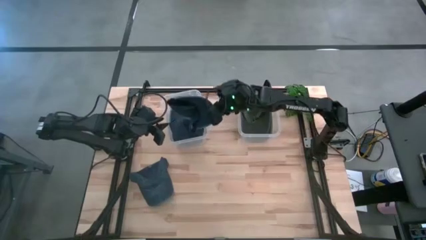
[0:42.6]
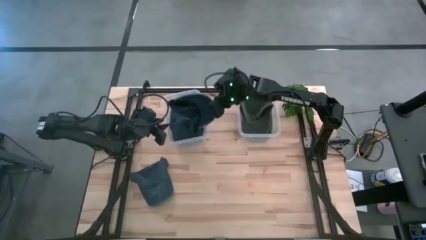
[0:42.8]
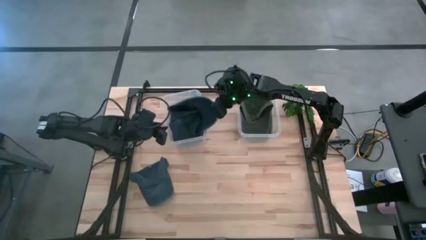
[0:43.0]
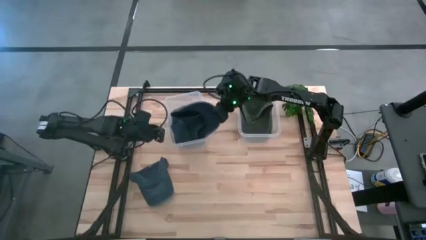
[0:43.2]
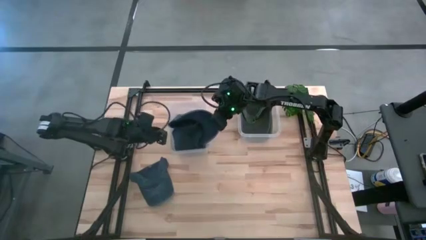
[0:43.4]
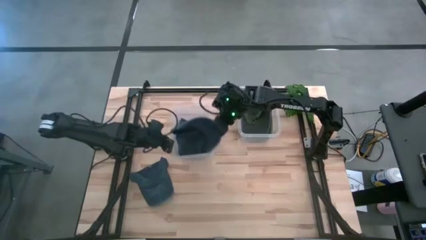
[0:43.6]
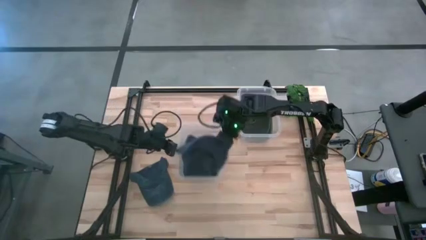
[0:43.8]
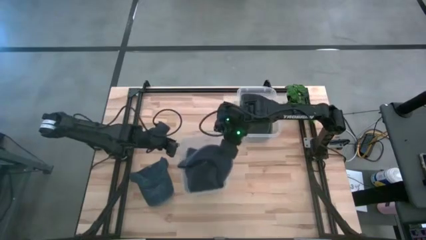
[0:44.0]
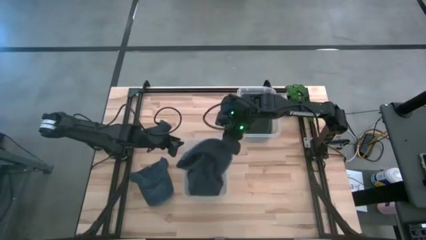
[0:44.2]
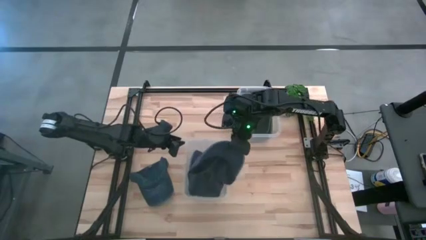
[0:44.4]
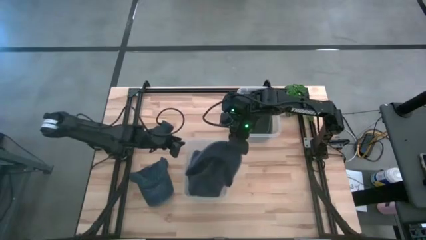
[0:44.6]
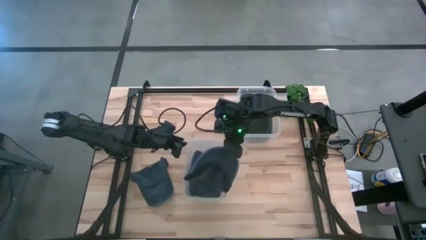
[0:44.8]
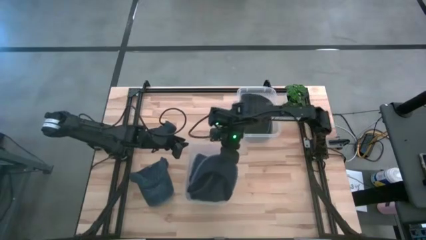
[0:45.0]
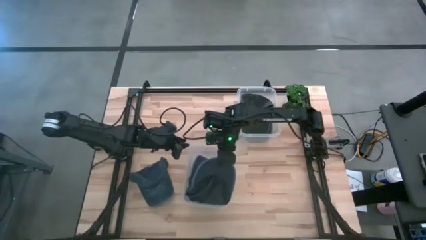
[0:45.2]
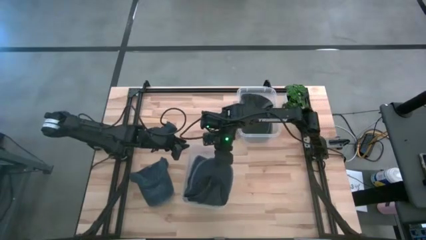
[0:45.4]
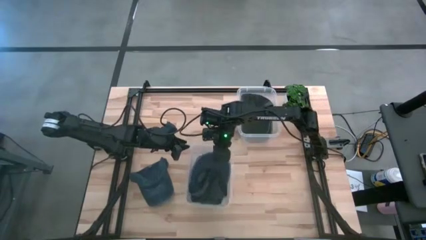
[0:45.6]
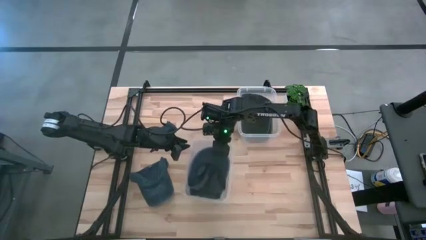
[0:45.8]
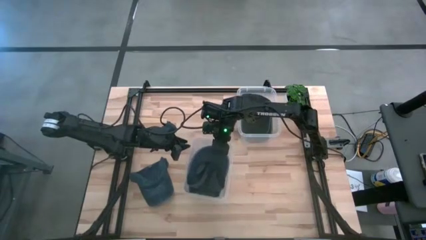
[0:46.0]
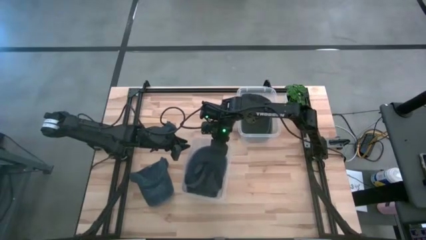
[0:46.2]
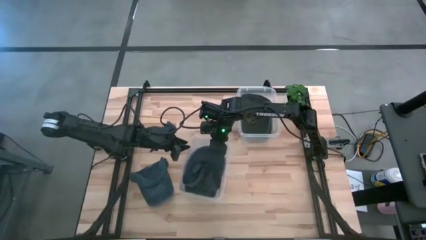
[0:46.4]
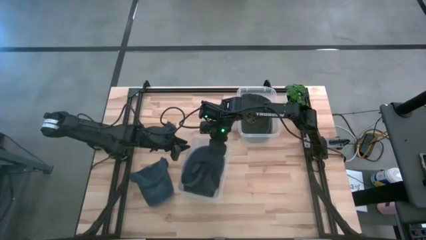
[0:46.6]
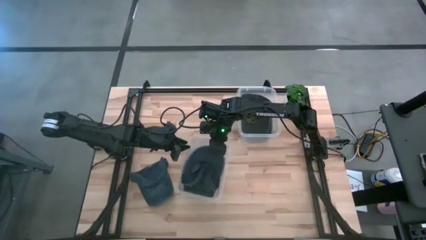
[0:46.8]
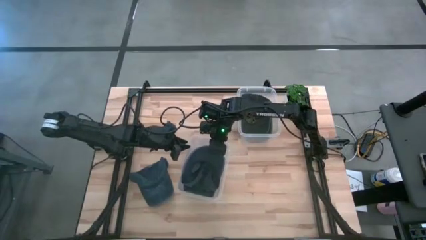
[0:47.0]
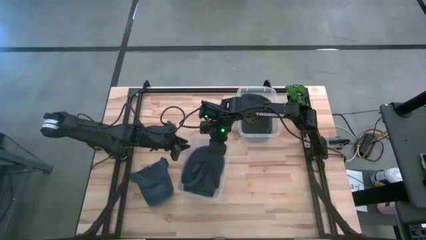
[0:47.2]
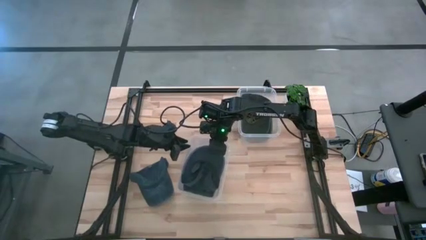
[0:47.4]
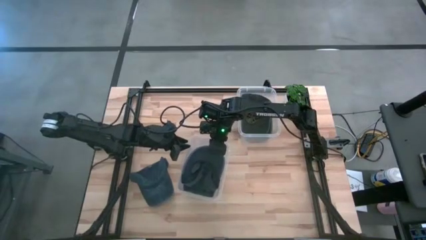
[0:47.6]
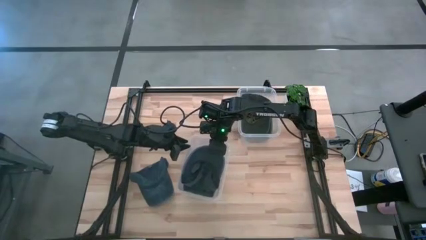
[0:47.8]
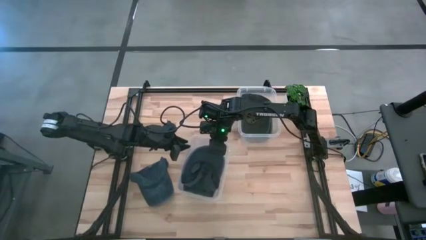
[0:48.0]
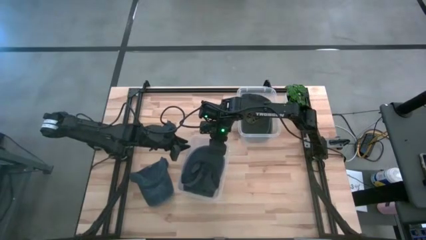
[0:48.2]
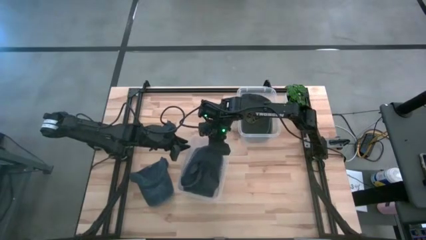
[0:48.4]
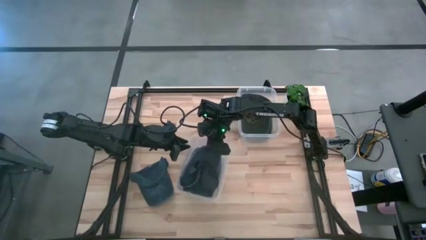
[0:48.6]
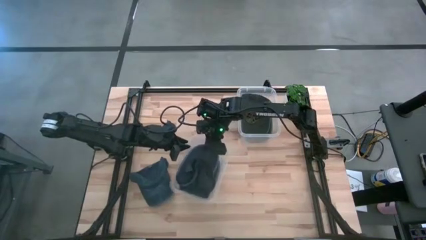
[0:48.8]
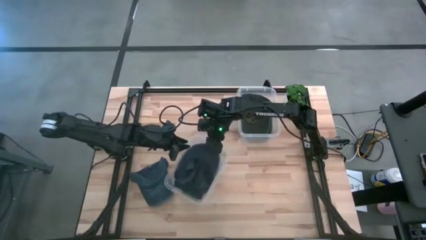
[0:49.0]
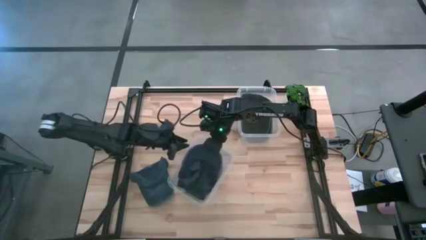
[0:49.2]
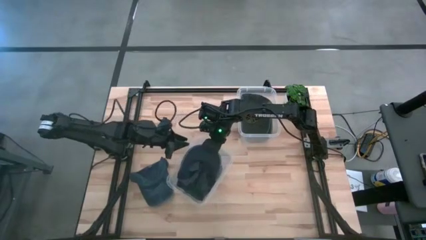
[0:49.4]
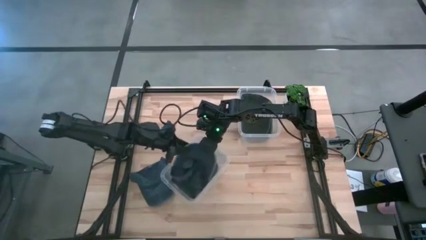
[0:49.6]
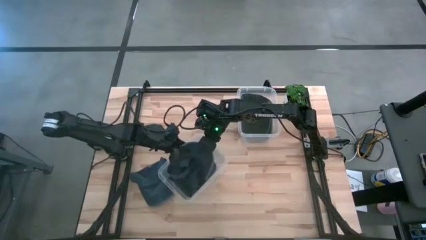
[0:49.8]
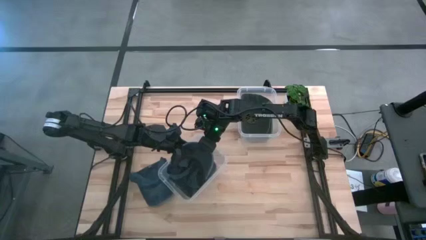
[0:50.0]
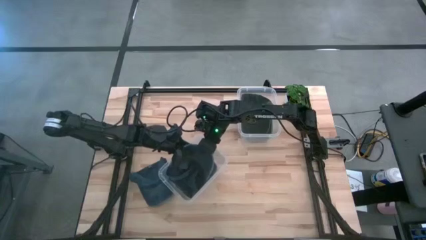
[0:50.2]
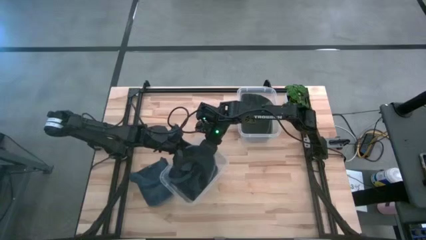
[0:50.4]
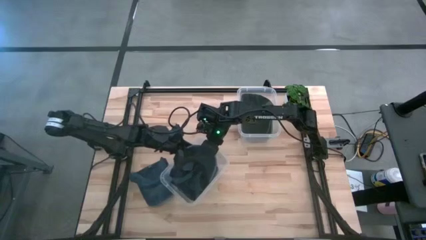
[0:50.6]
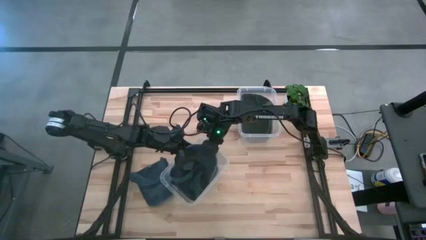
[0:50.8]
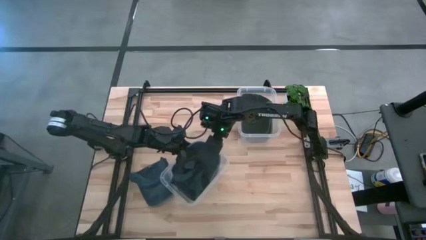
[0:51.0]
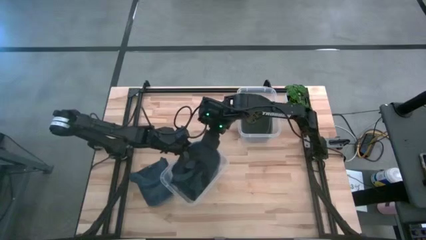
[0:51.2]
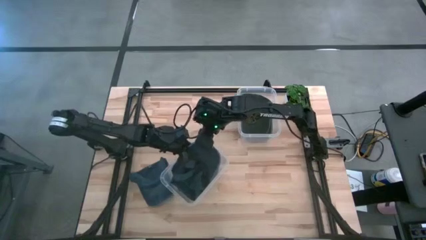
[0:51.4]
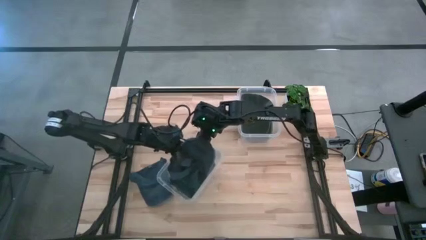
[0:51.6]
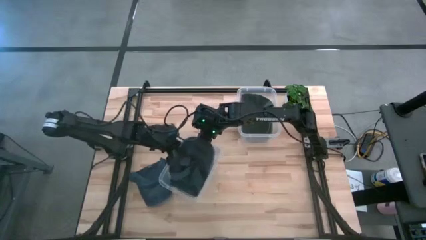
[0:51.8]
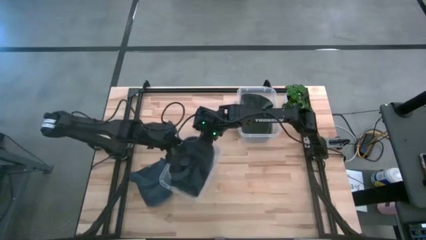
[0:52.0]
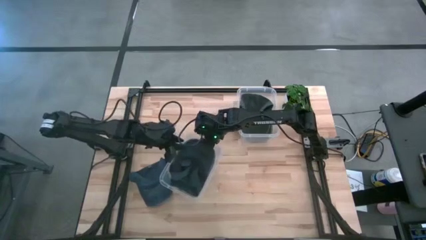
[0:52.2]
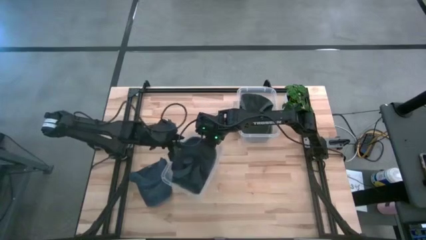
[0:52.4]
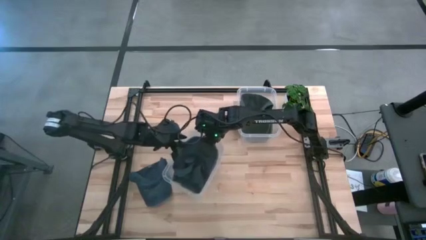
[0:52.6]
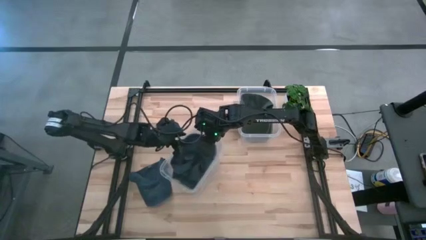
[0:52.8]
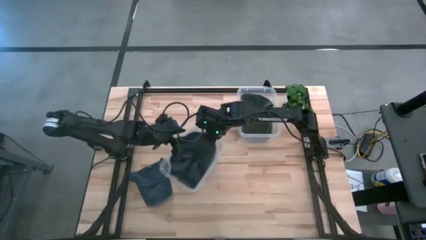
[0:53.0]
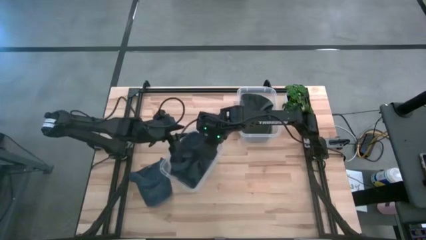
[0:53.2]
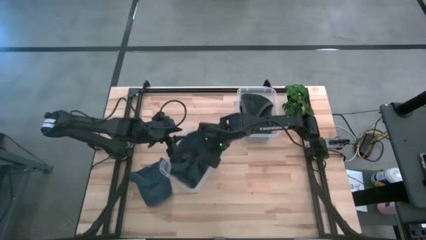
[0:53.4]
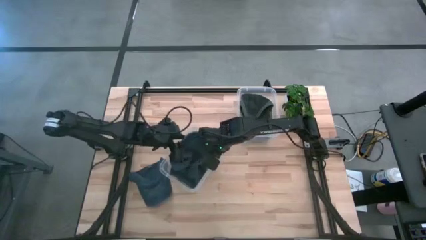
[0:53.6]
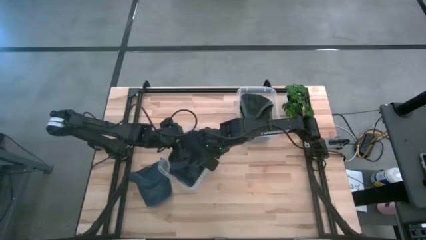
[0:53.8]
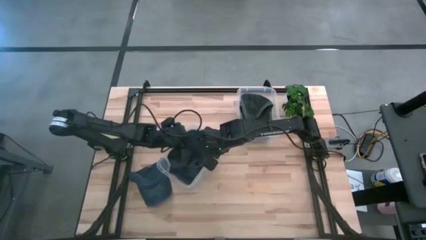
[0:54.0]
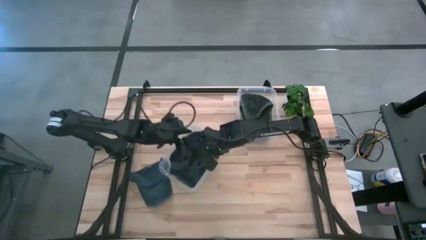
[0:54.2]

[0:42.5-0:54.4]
Task: Pick & Place hat
Put the right blue cap into the left transparent bin

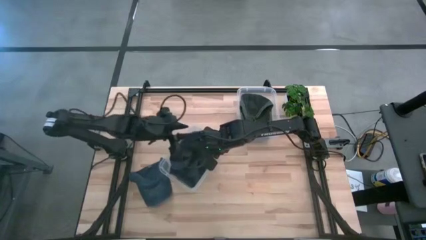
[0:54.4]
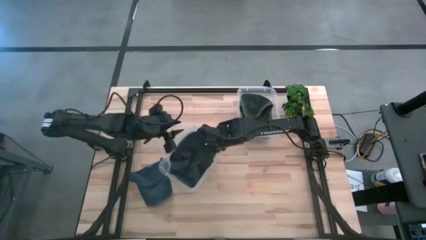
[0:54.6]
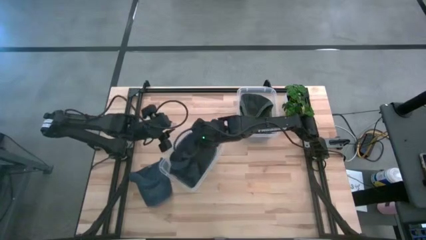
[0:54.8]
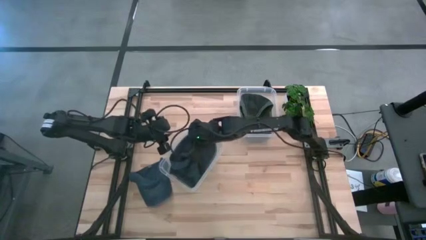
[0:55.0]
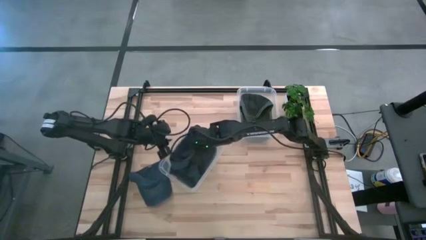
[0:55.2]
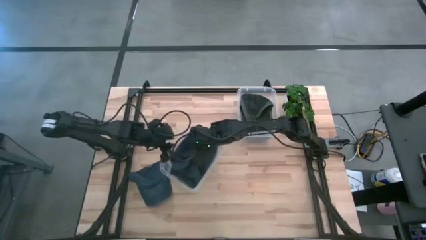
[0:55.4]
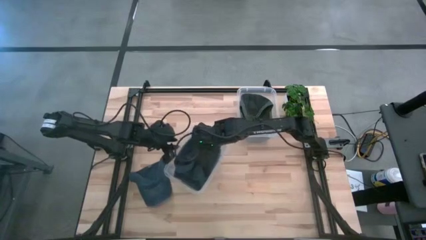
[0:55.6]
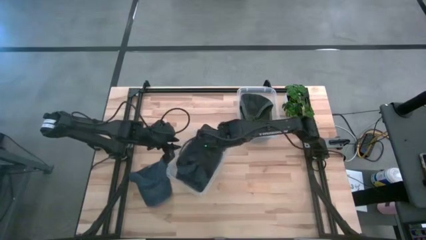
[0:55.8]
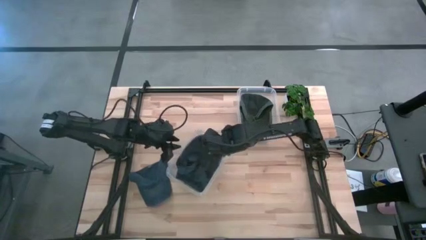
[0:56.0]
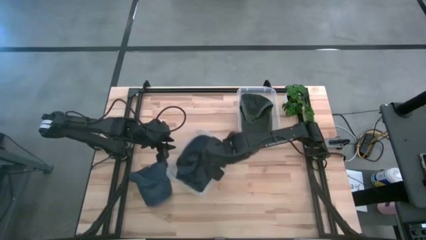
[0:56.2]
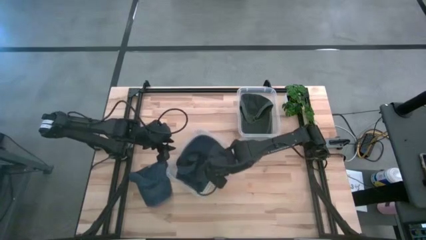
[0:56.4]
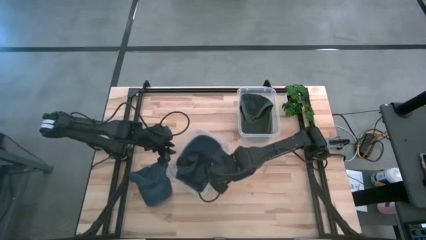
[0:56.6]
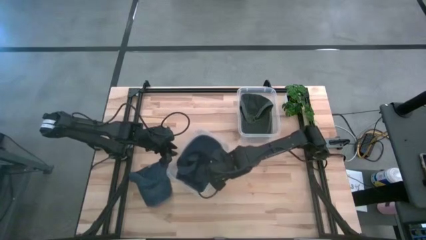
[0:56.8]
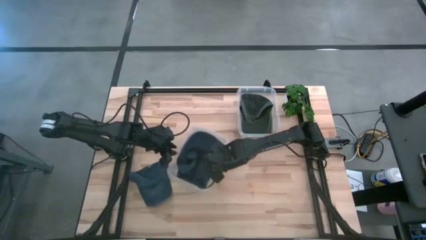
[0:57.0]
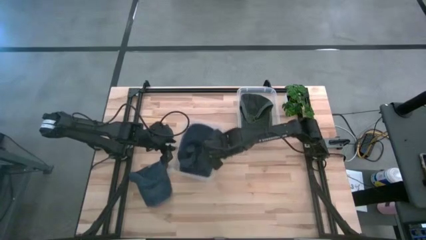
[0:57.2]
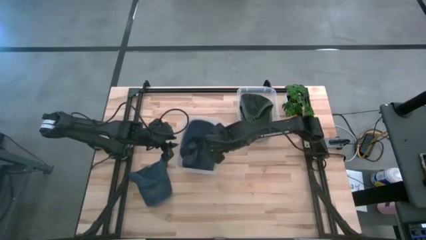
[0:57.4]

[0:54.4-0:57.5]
Adjust the left transparent bin
